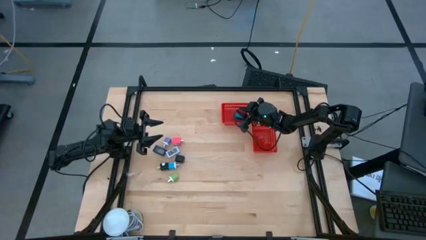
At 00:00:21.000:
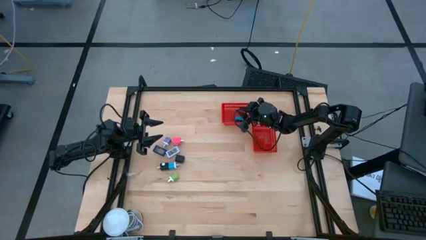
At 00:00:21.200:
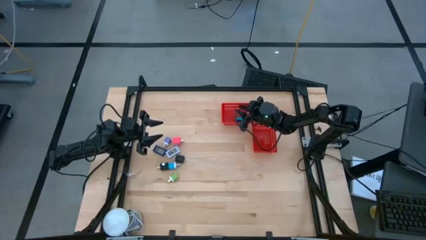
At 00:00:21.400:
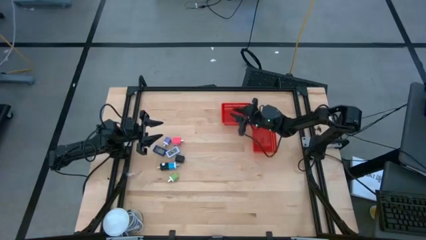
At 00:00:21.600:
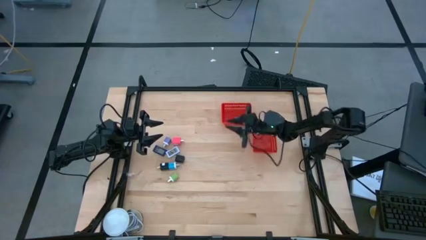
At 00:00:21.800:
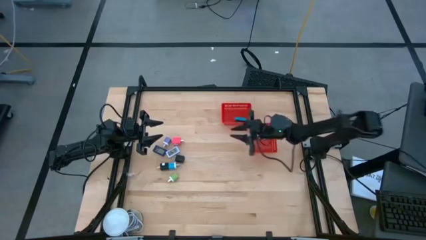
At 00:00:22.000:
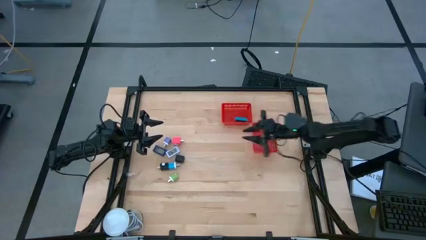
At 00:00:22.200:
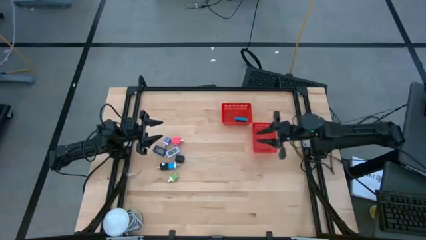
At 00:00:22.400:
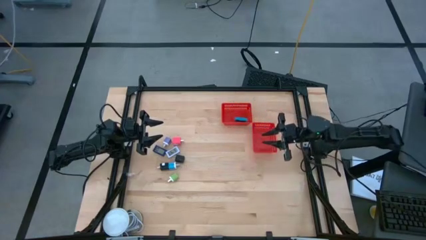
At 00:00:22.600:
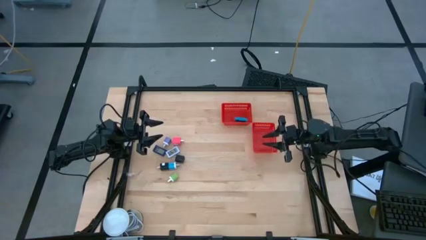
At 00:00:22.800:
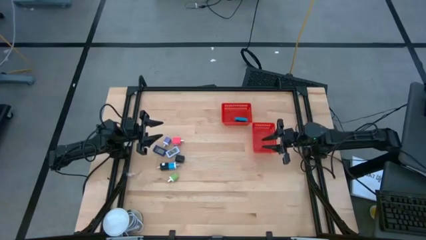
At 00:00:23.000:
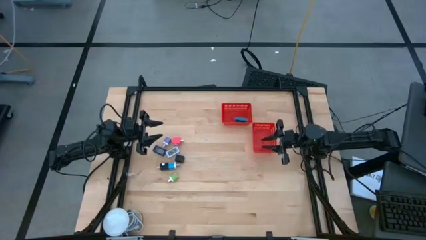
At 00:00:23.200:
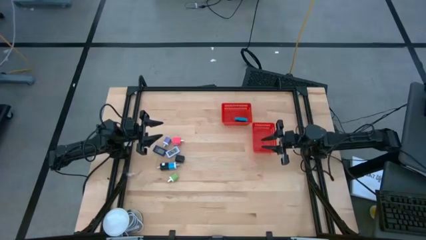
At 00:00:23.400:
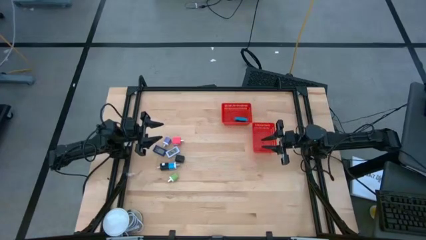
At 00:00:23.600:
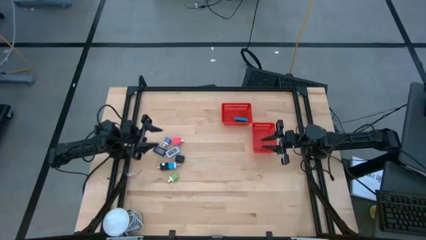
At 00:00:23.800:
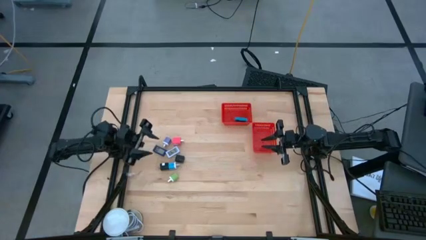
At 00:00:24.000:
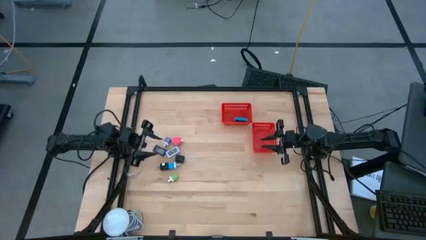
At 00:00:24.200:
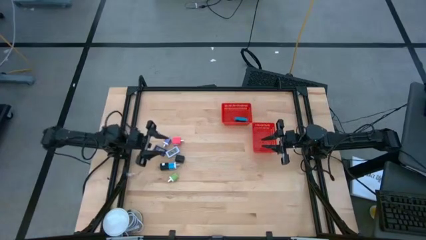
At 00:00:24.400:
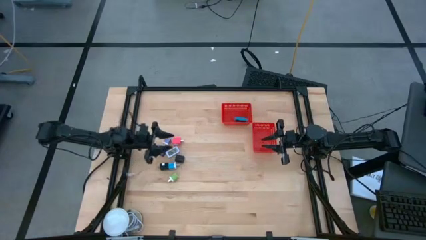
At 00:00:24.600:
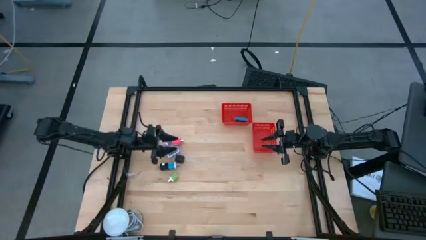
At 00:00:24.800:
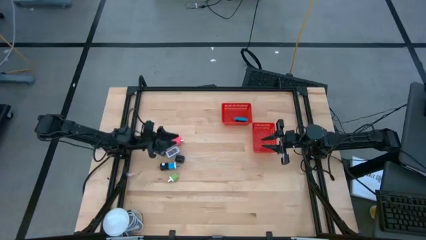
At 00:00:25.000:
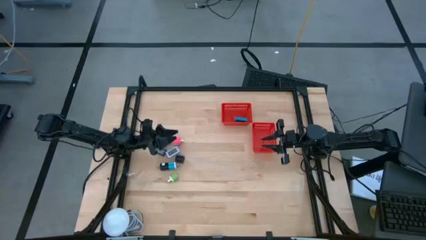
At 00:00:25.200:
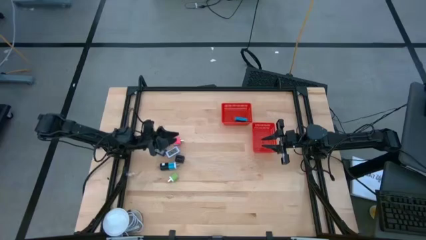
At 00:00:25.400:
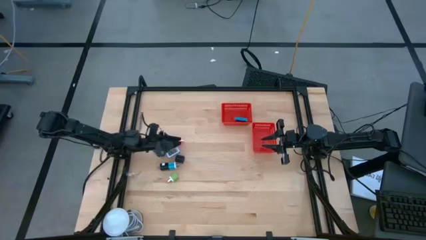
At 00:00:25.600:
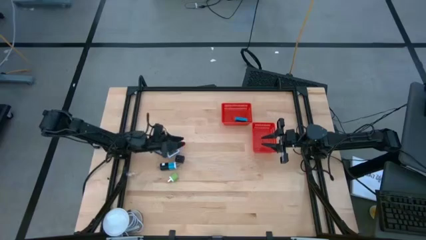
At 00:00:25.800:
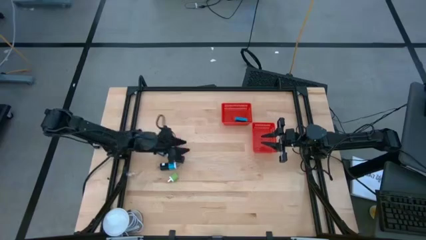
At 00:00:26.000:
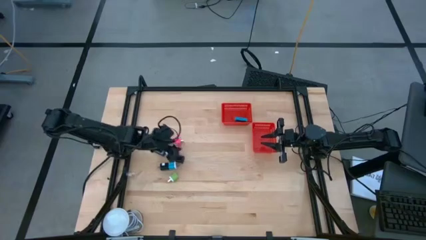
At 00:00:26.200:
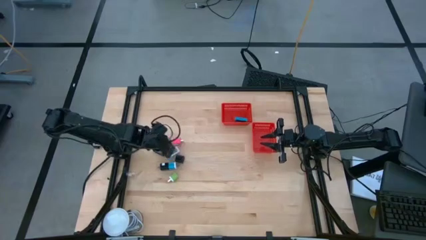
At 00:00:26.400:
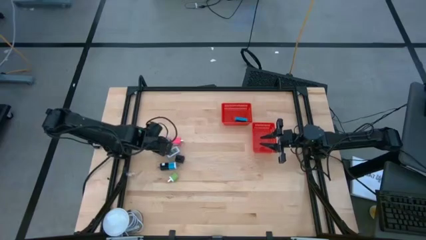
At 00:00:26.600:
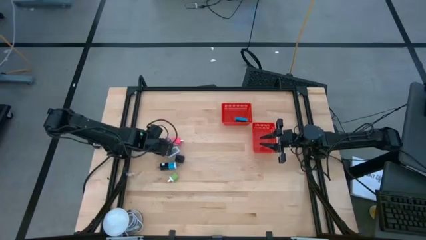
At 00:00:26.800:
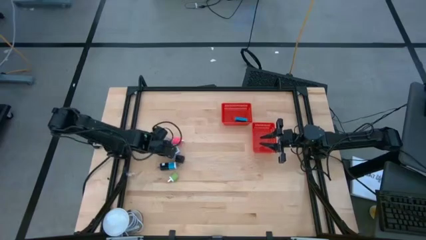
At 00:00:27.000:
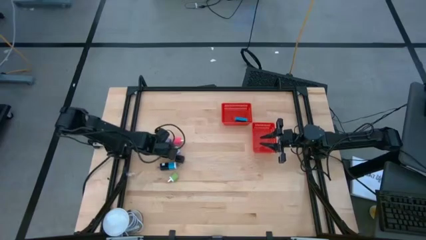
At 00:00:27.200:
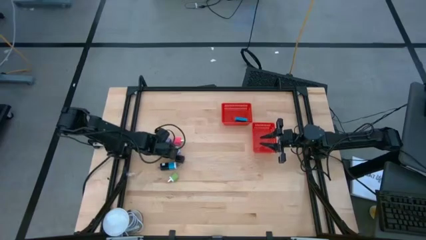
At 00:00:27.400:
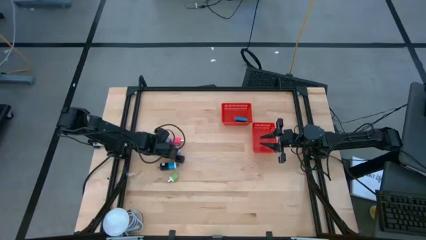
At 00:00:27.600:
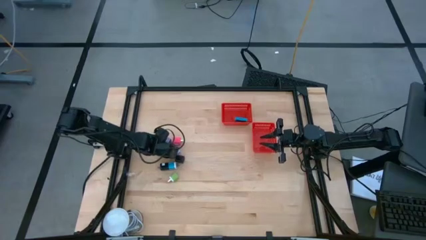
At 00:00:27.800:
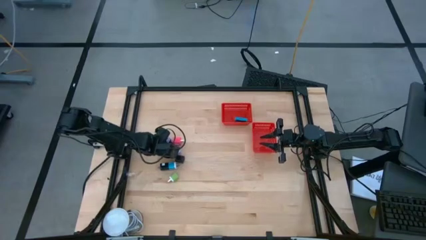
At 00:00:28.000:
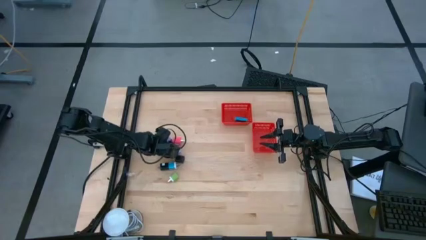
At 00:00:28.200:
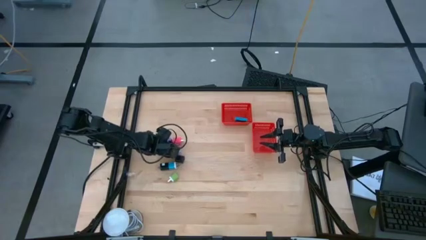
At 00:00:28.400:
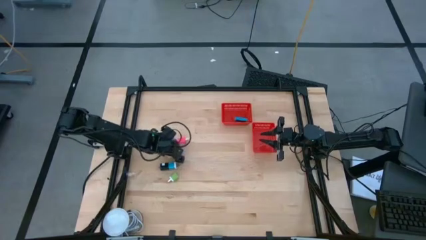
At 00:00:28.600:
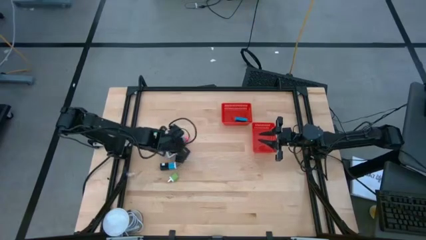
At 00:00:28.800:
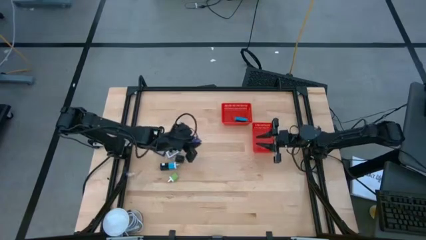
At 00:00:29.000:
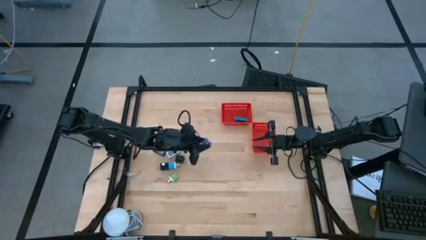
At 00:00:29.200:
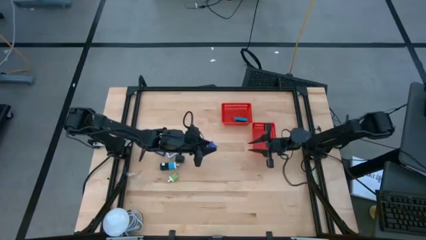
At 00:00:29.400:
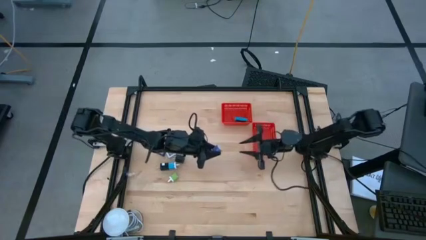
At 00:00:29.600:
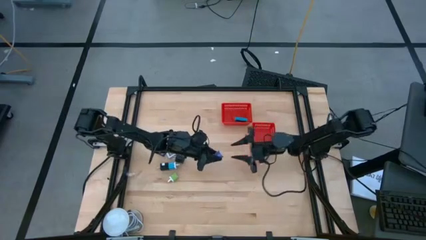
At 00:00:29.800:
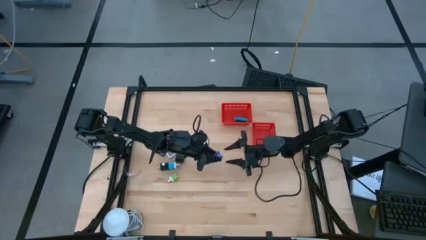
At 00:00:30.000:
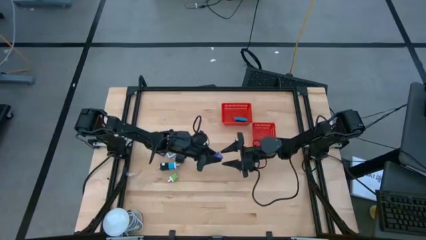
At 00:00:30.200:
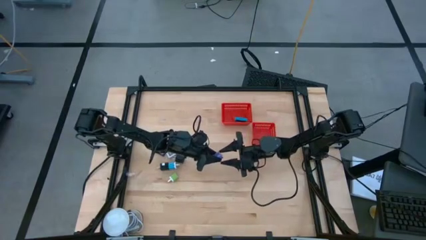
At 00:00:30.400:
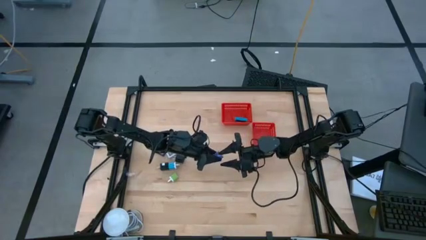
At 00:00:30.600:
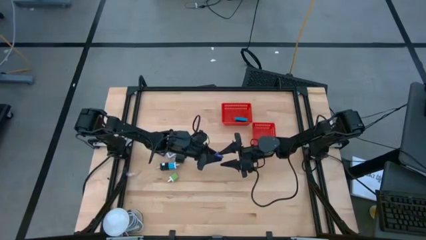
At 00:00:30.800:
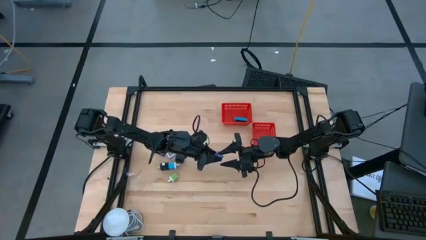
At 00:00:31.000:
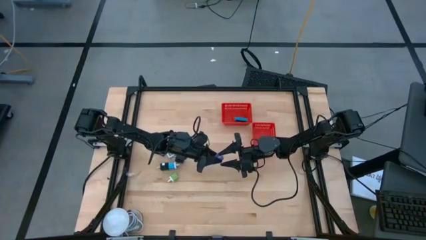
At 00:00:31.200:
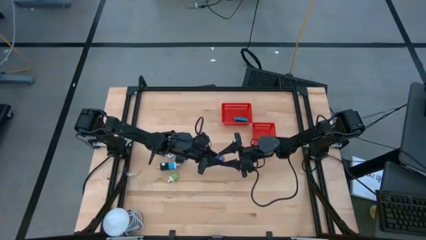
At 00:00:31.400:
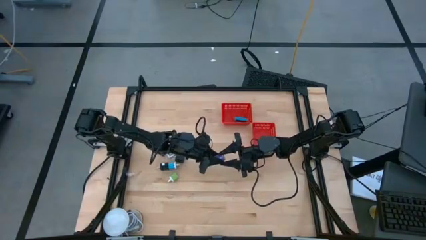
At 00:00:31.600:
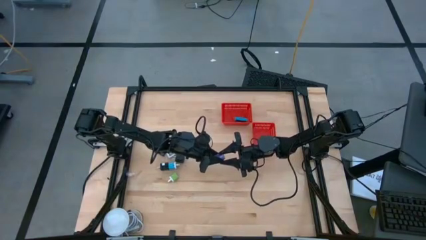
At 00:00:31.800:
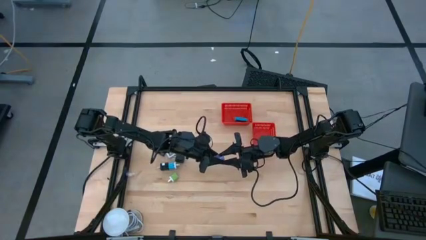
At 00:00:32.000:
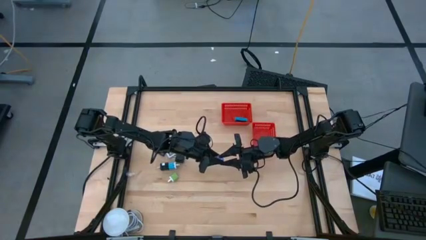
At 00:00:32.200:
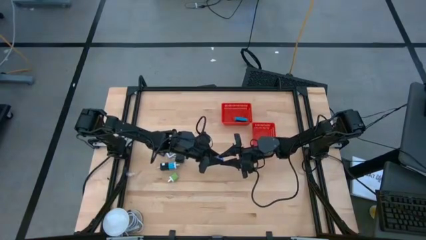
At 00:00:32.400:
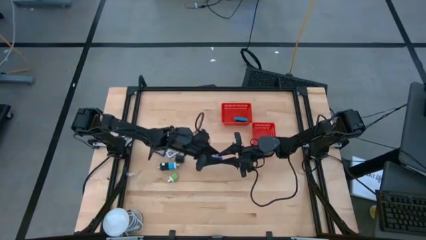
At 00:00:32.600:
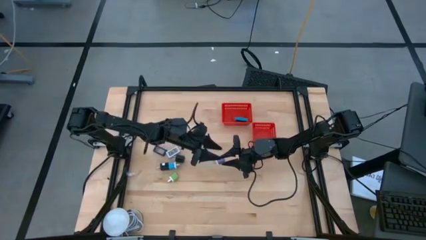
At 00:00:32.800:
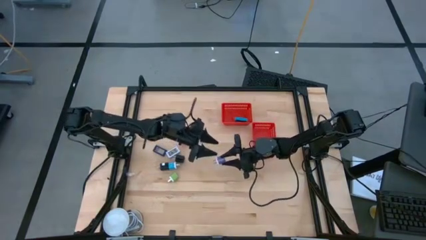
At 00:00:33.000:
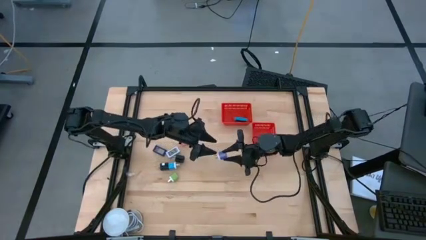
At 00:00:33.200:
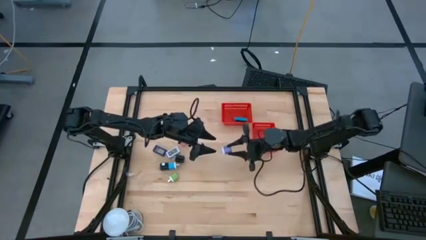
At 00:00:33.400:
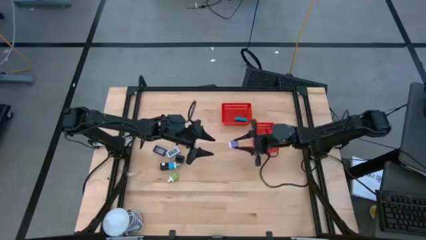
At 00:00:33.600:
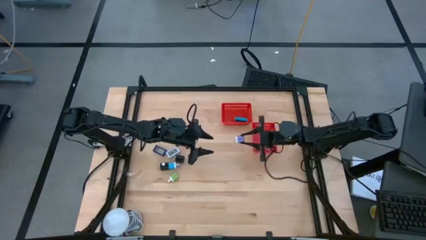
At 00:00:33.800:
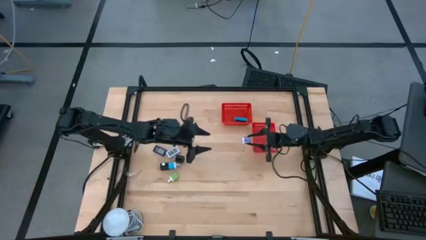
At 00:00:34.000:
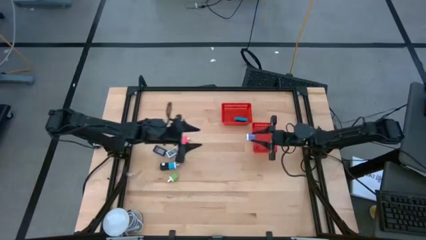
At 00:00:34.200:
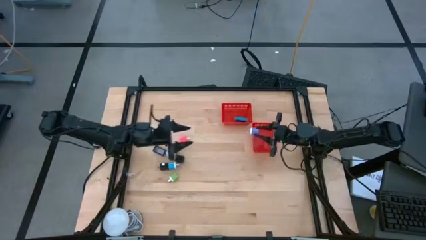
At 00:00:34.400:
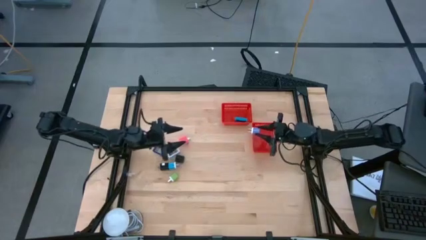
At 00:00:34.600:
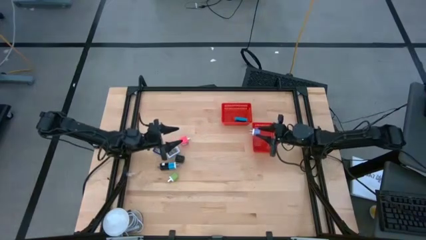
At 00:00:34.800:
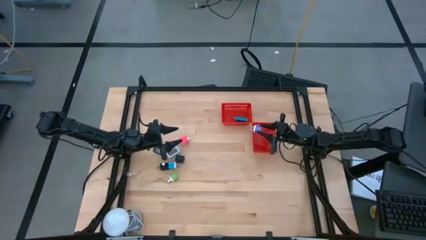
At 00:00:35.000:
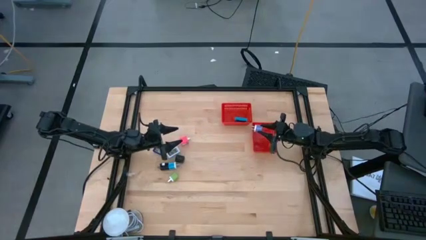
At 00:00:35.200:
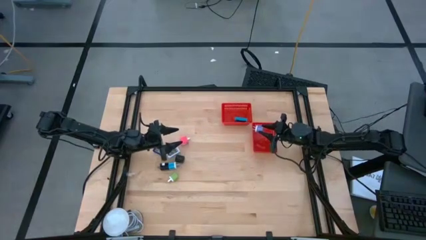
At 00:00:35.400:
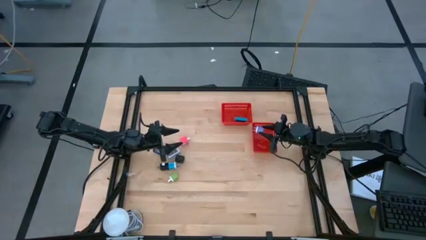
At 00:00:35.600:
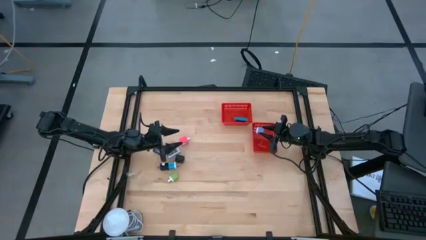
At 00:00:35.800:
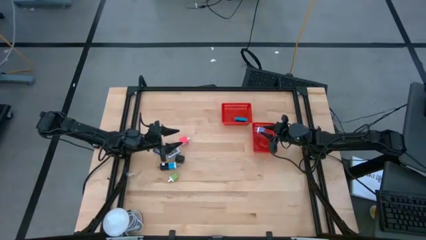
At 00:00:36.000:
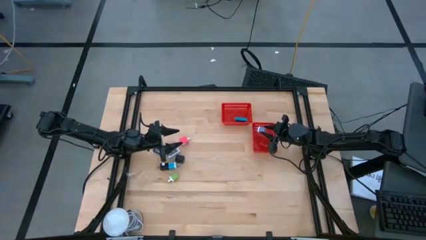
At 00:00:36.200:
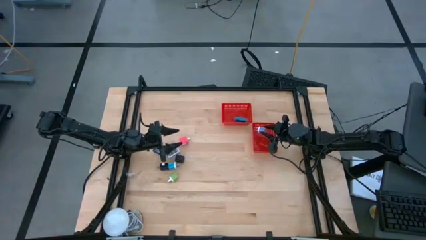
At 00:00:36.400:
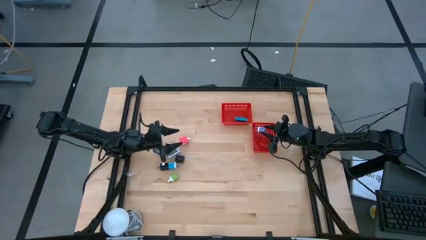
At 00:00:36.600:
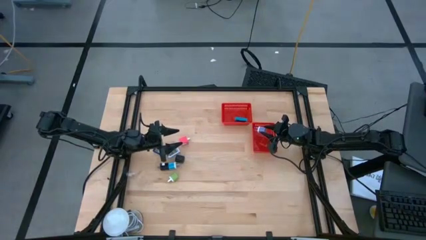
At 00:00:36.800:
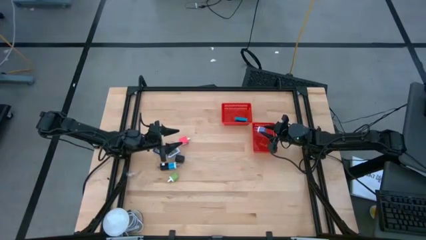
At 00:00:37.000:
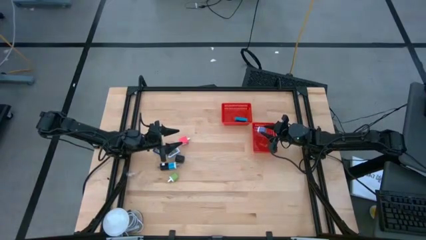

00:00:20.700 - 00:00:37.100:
Task: Pick & Place Office items
Put the purple charger adapter into the bottom red bin

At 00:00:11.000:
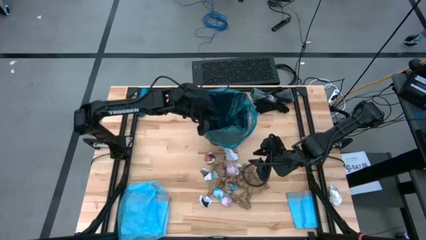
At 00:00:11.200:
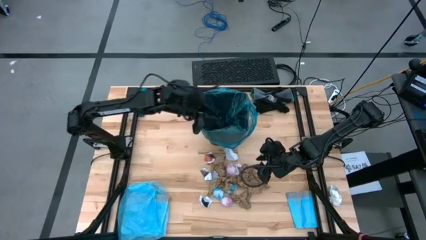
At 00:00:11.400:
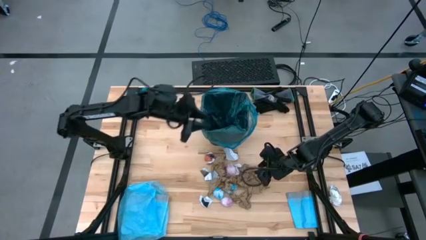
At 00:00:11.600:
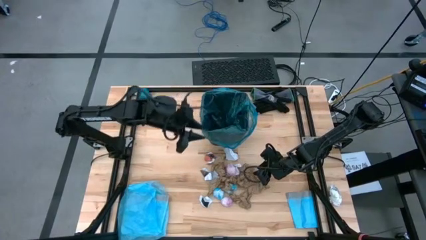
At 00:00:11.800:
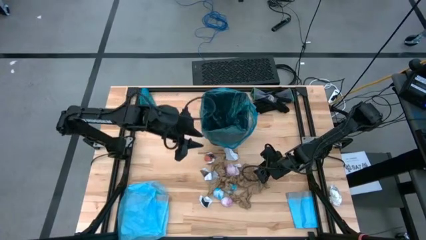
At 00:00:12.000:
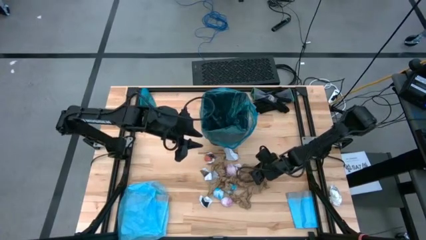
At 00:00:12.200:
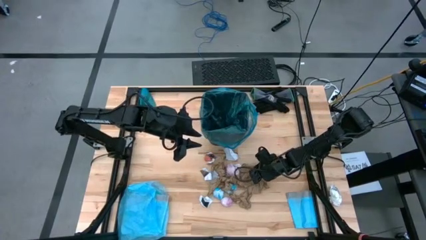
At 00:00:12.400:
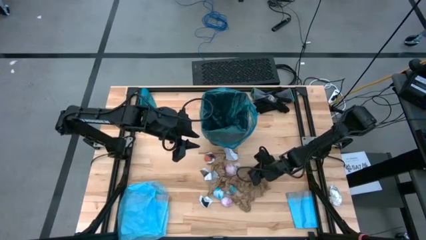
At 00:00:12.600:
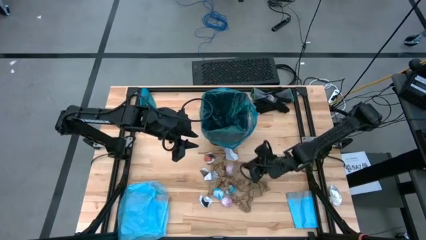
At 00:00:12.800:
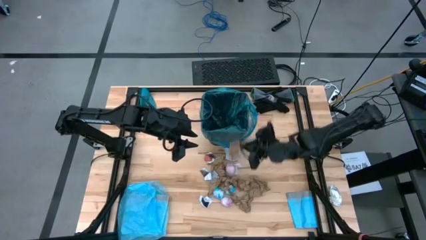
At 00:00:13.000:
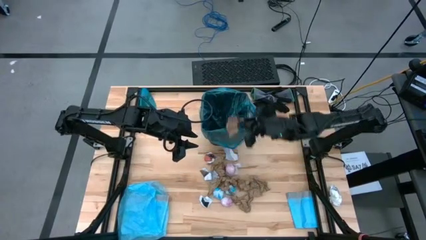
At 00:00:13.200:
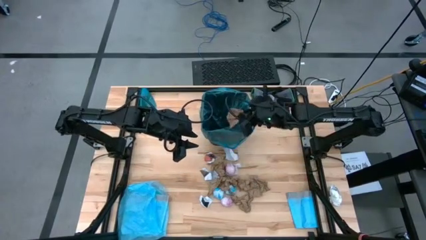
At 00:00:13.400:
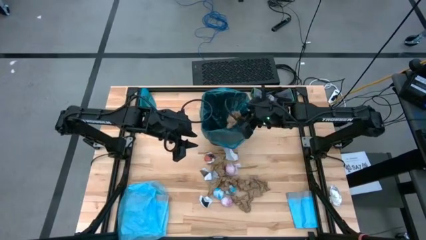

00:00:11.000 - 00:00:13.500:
Task: place trash/remove bag and relplace
Put the brown napkin into the blue trash bag inside the black trash bin
